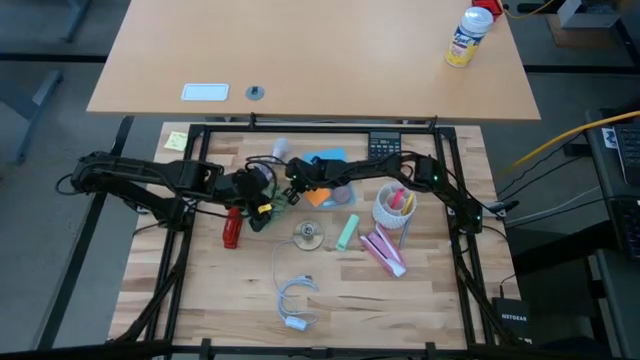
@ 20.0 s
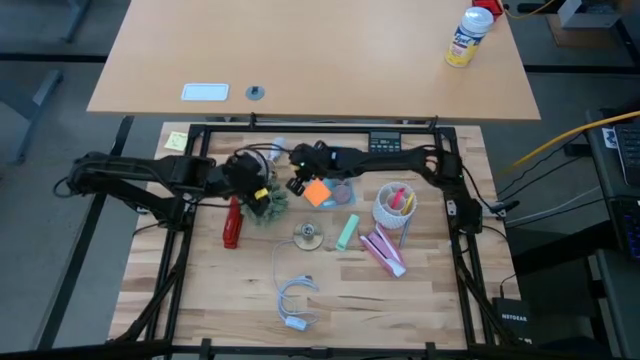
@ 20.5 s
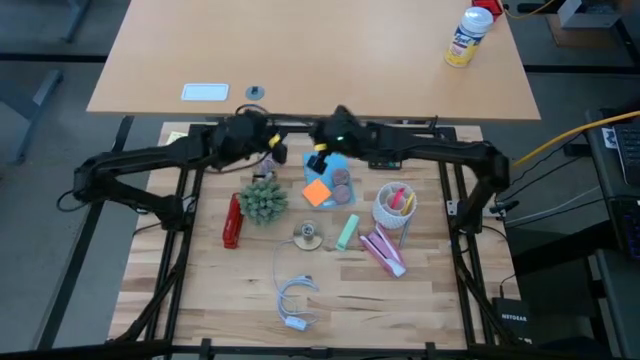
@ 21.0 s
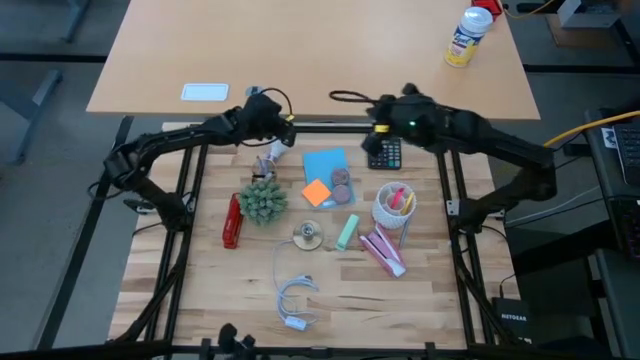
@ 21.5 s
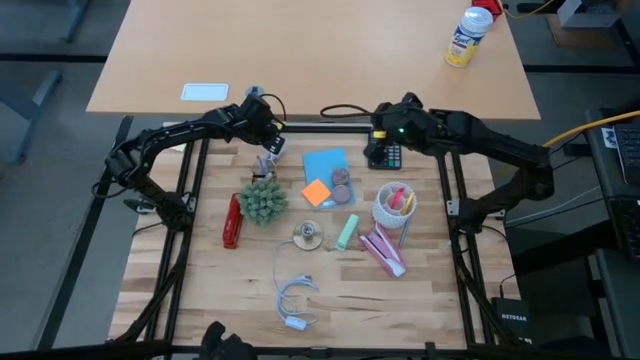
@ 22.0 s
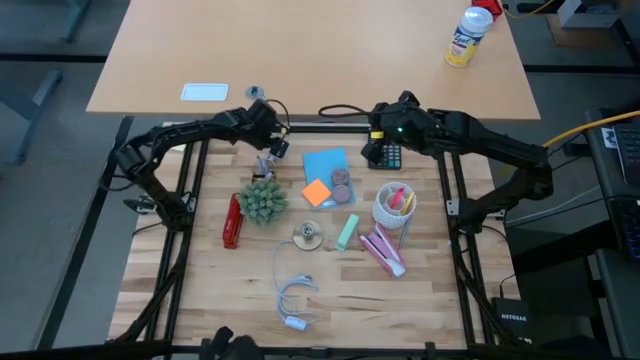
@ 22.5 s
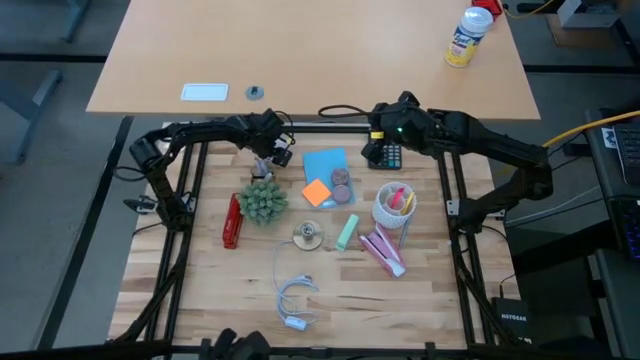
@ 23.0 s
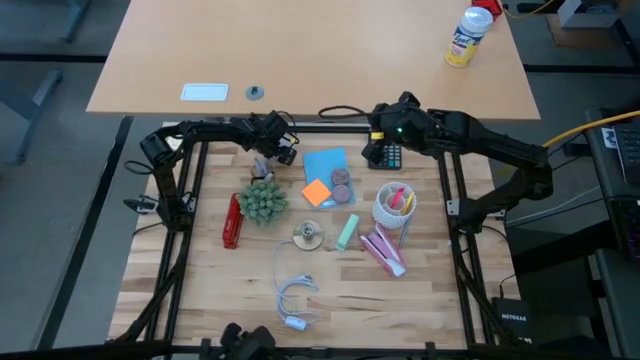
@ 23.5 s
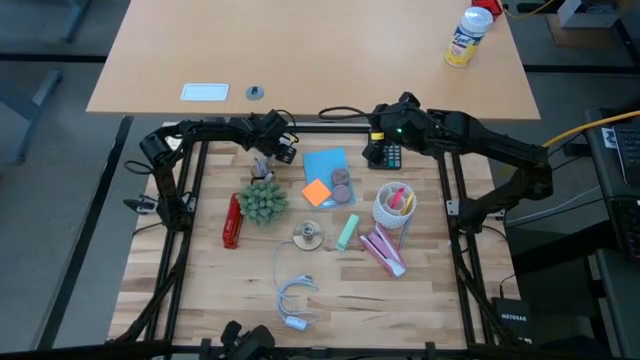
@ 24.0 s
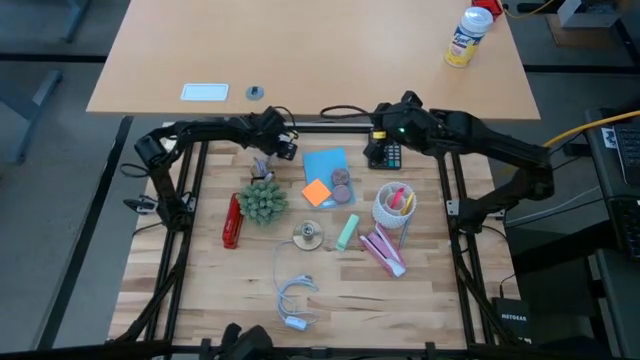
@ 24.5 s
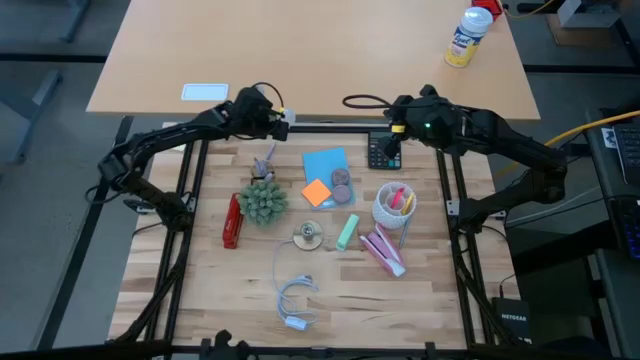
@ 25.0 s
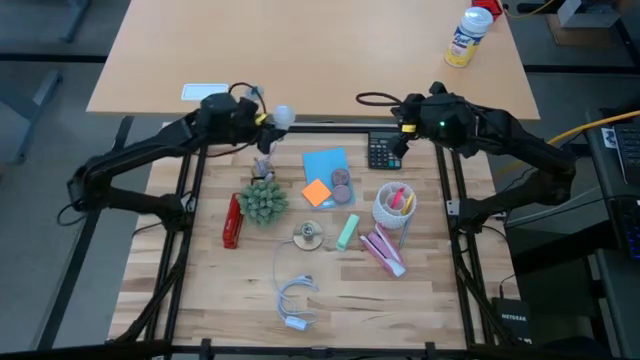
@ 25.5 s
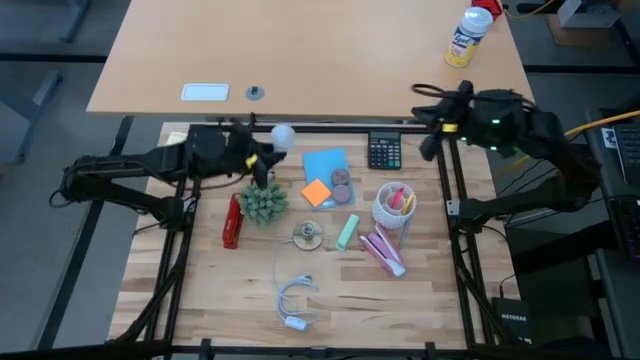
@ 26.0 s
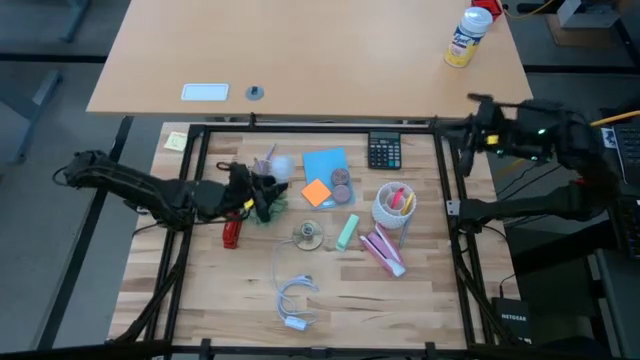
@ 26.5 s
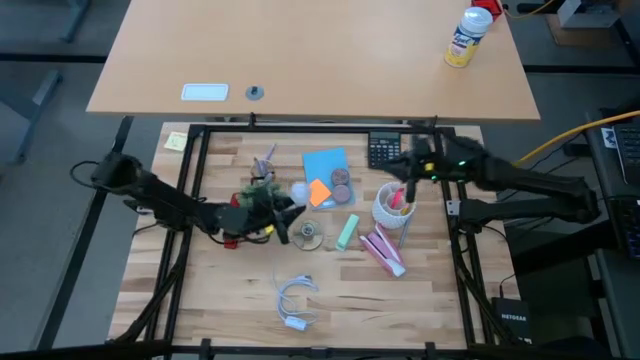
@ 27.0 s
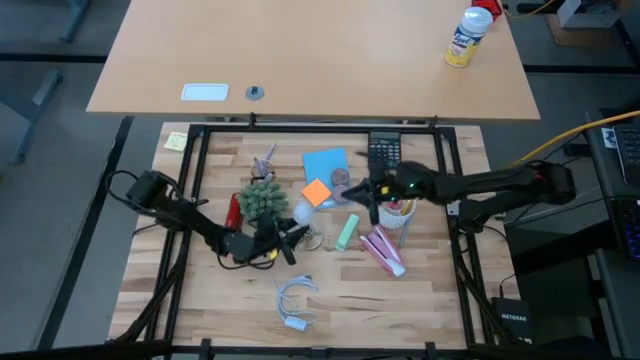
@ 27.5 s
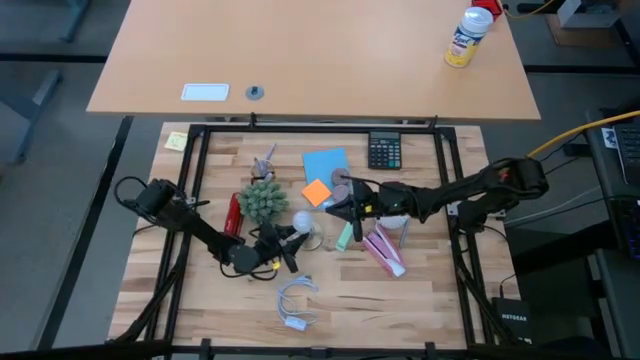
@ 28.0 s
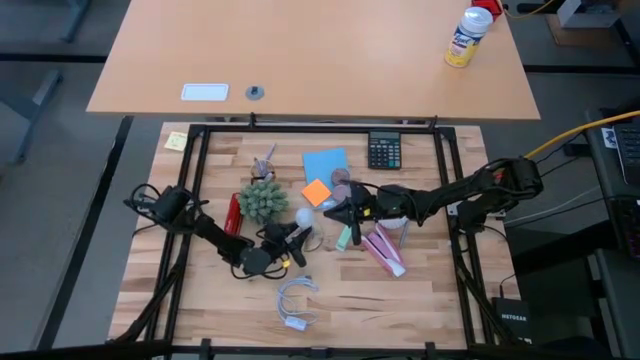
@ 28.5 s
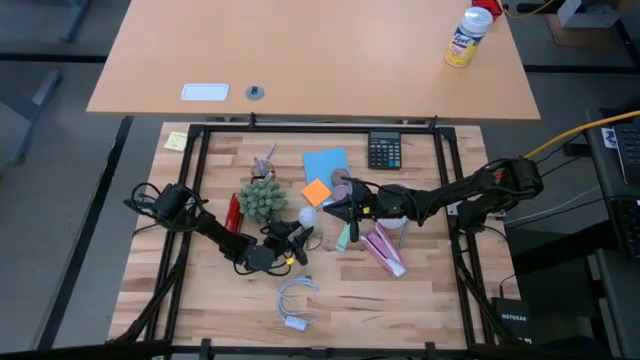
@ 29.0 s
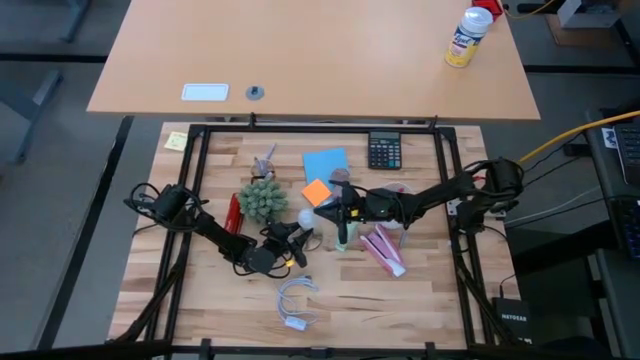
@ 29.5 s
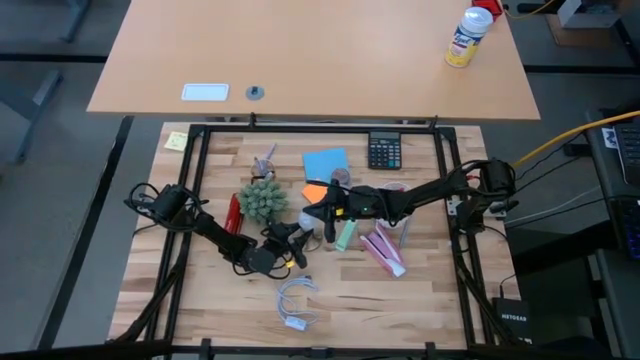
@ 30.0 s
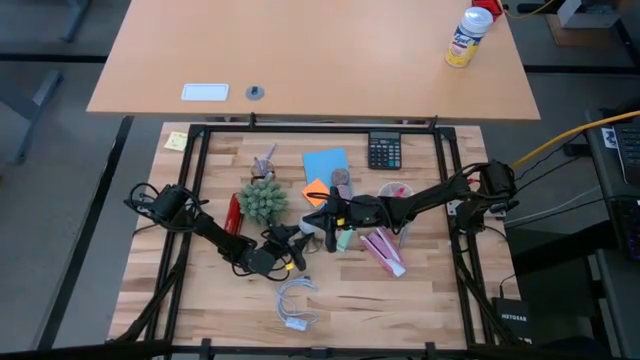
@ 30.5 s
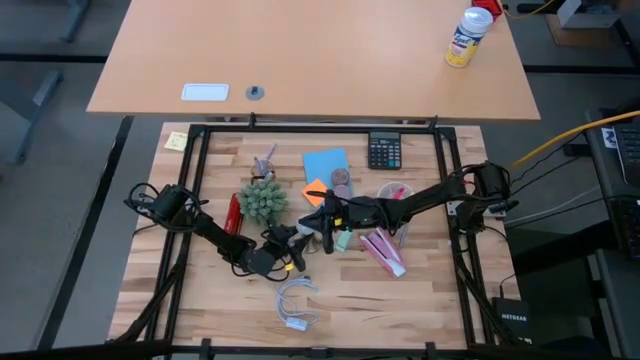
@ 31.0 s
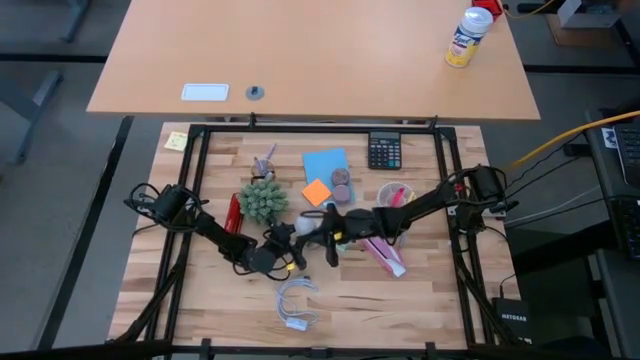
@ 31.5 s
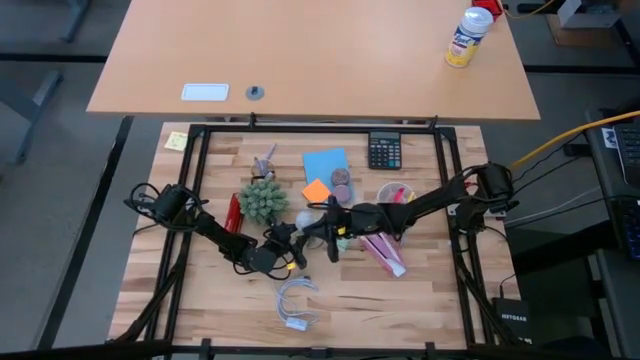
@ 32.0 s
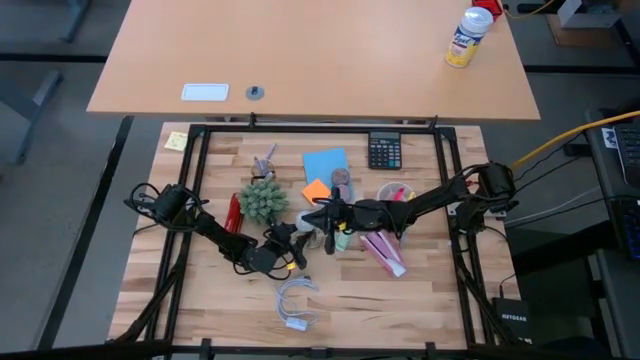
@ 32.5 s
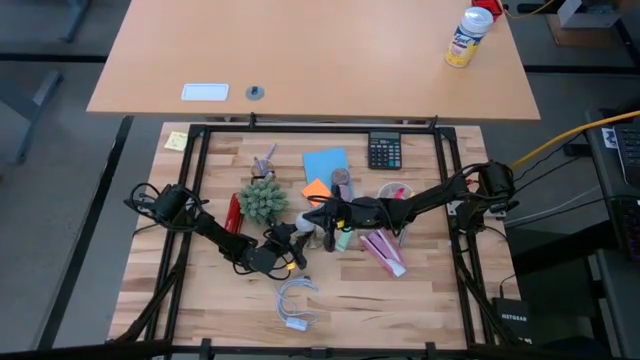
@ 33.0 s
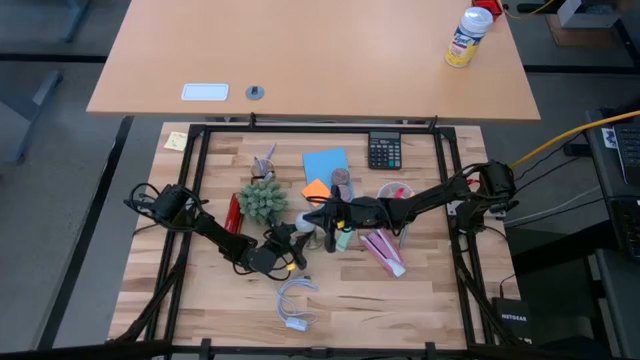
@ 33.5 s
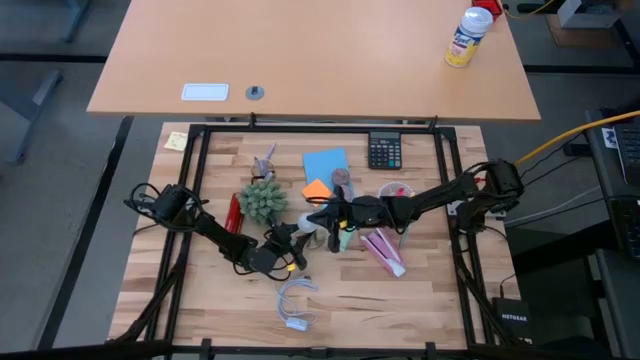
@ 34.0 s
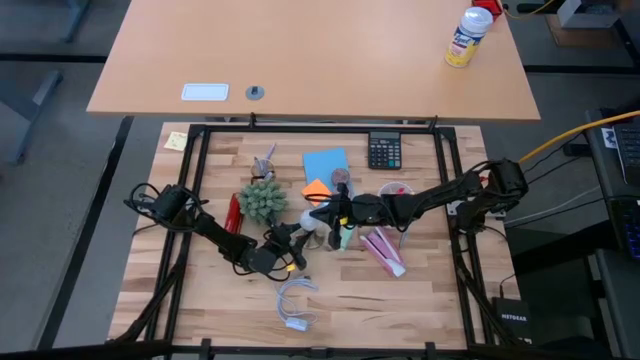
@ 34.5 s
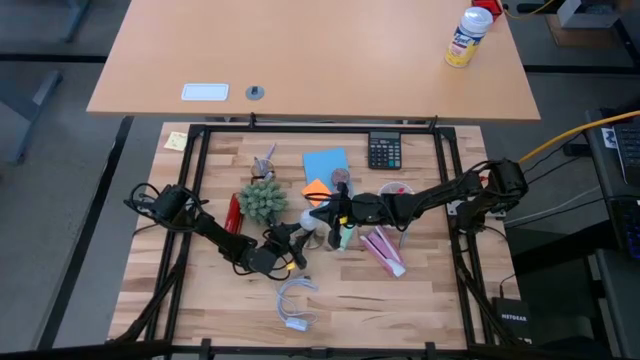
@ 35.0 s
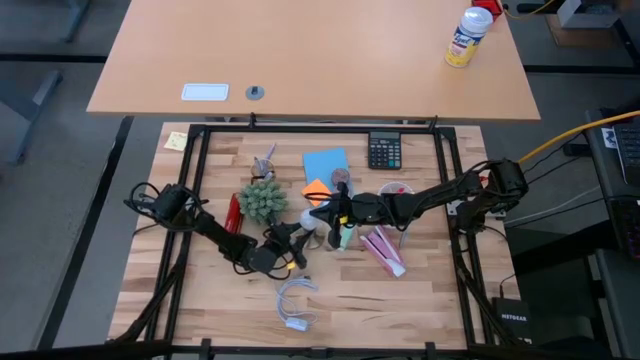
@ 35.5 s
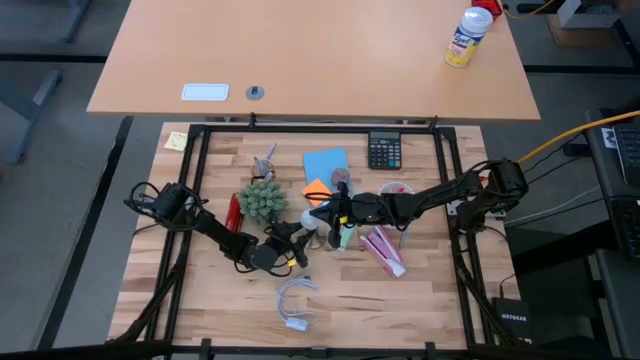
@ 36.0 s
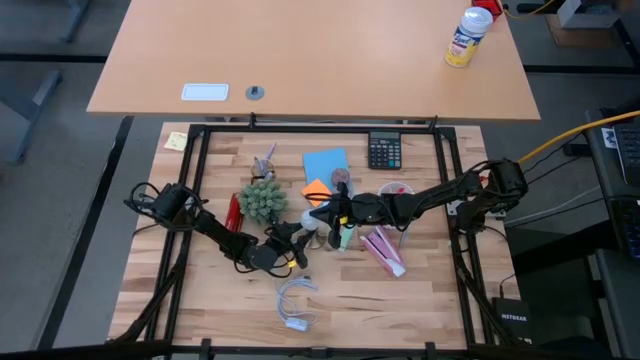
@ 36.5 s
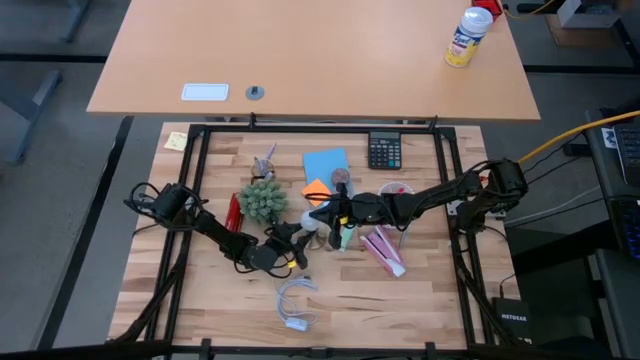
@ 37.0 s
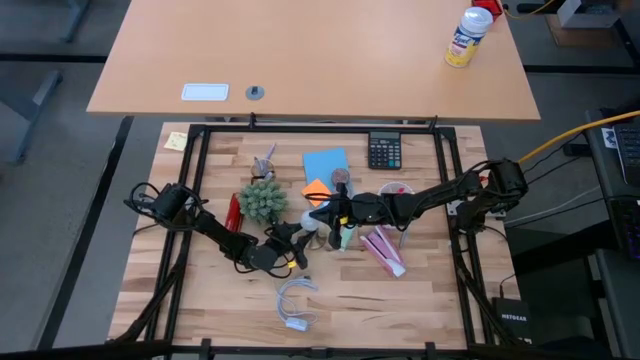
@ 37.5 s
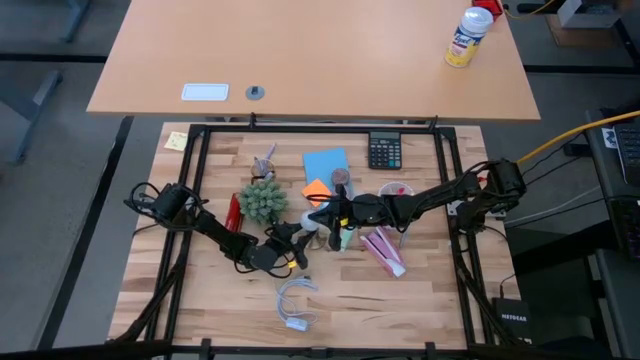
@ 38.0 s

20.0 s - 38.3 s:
Task: Screw lightbulb
Insert the white lightbulb into the lamp socket

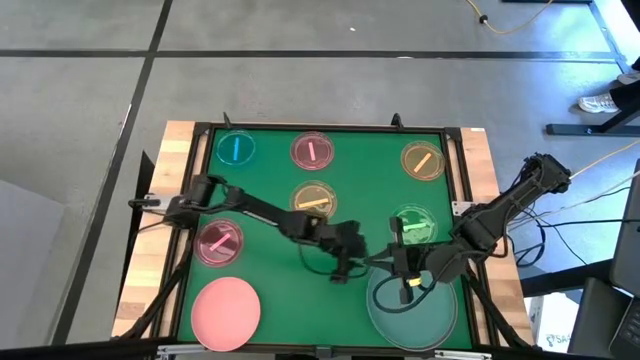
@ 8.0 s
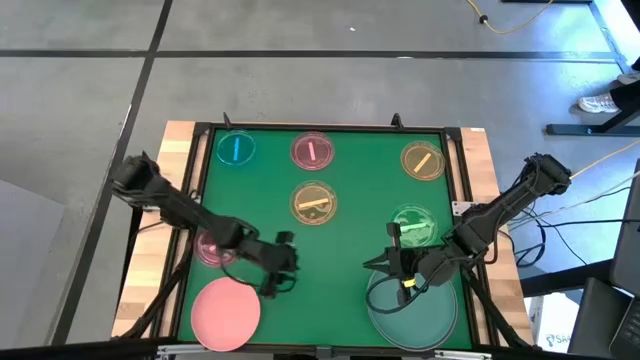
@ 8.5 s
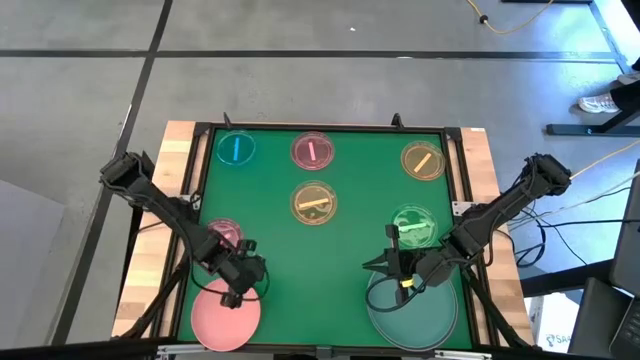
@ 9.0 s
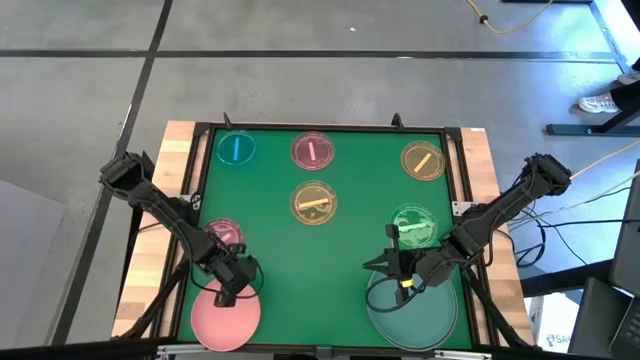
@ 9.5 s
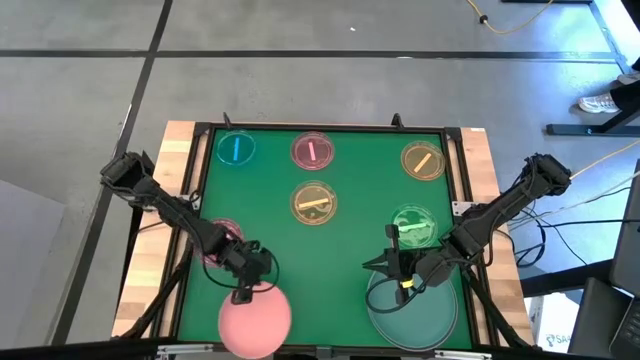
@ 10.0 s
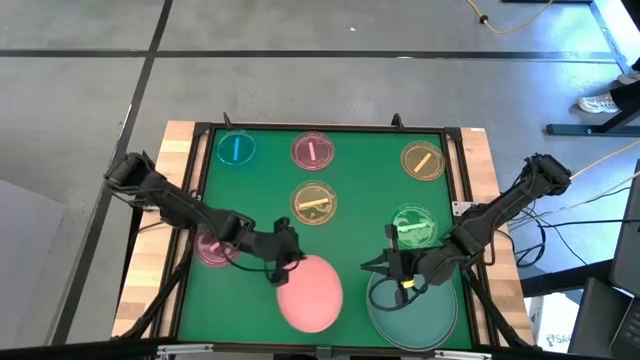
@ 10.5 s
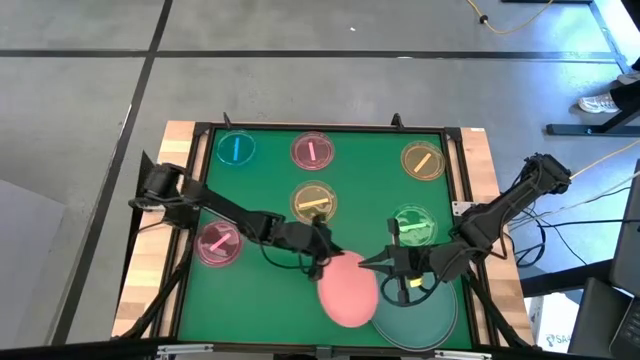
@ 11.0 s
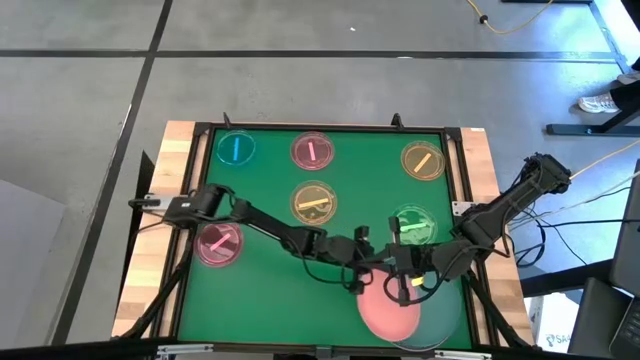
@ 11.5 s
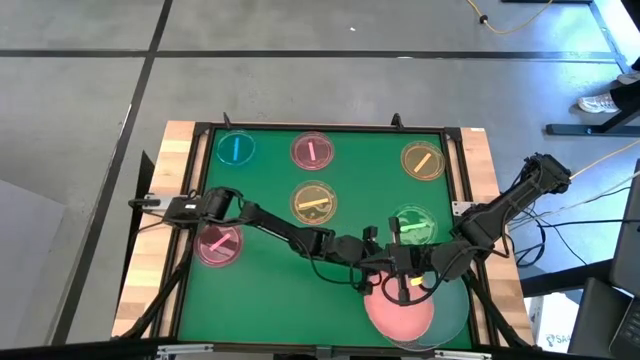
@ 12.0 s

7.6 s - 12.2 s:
Task: Stack plastic plates
Stack the light orange plate on top of the green plate
